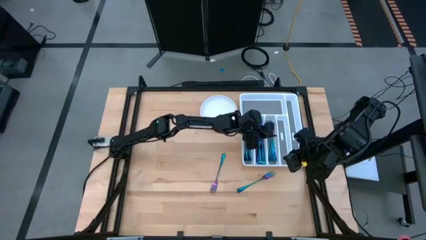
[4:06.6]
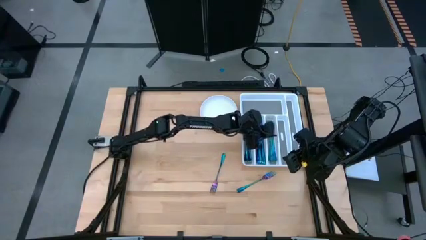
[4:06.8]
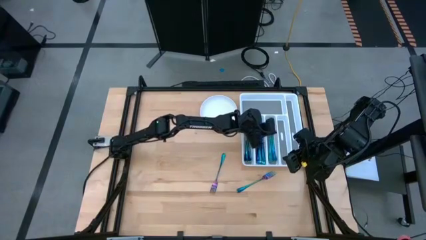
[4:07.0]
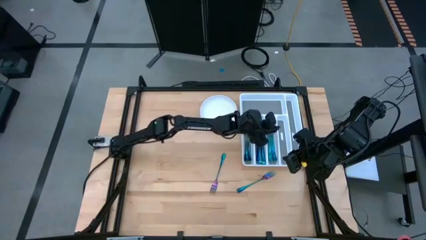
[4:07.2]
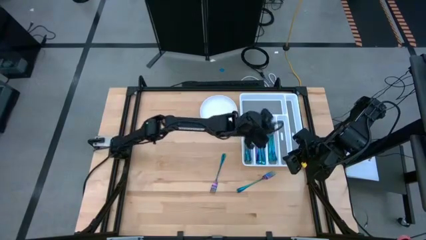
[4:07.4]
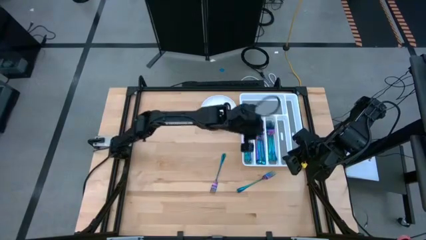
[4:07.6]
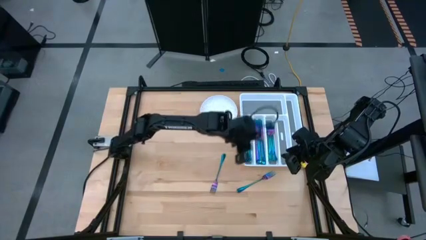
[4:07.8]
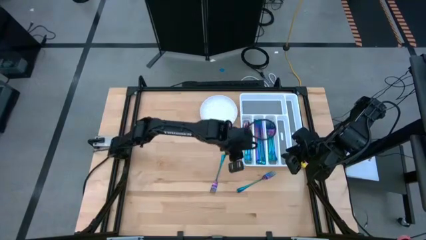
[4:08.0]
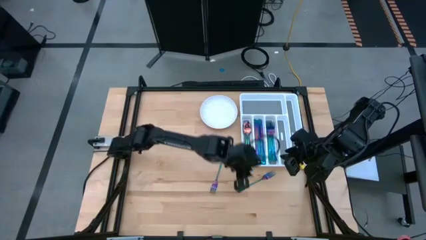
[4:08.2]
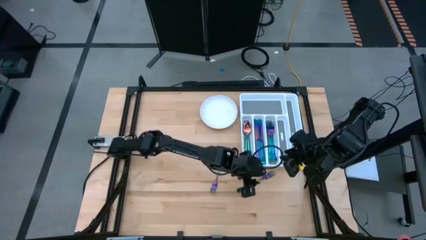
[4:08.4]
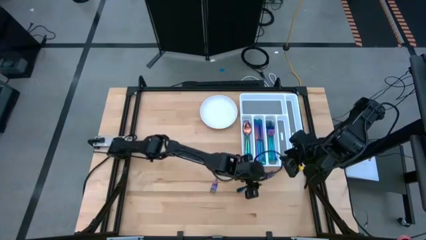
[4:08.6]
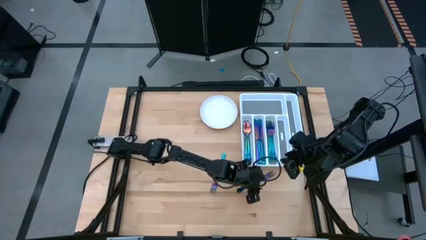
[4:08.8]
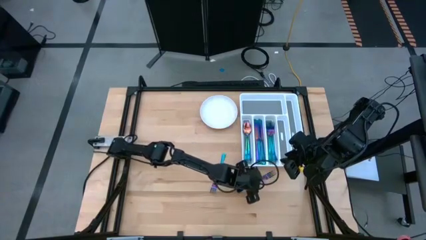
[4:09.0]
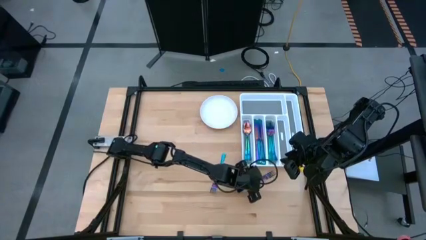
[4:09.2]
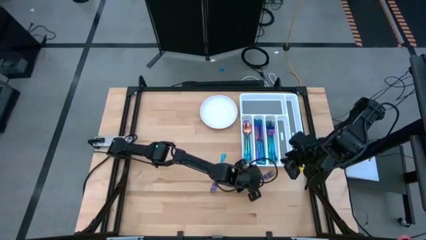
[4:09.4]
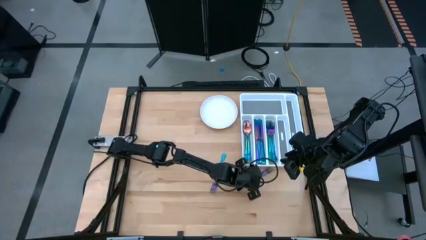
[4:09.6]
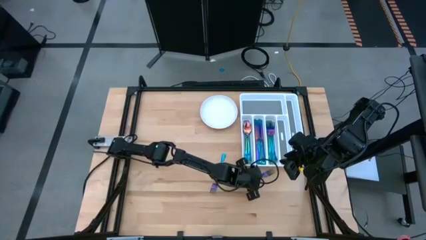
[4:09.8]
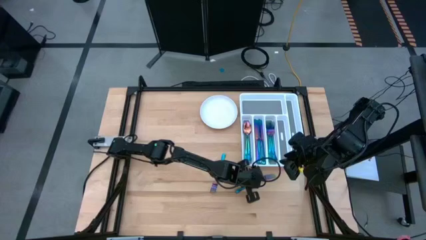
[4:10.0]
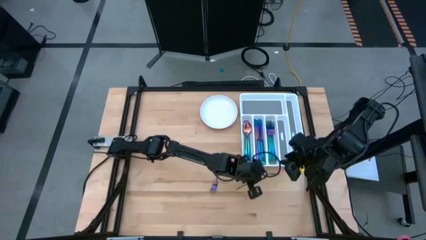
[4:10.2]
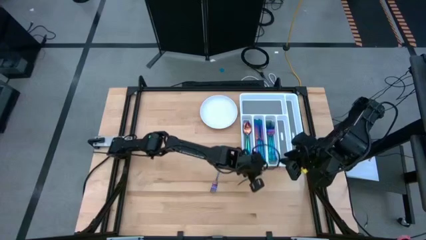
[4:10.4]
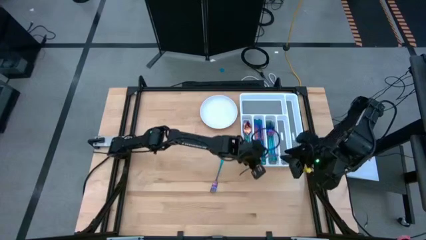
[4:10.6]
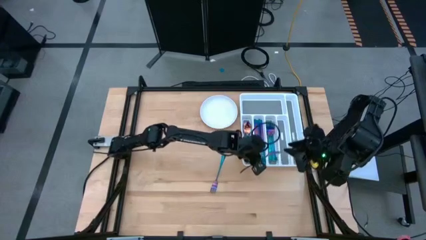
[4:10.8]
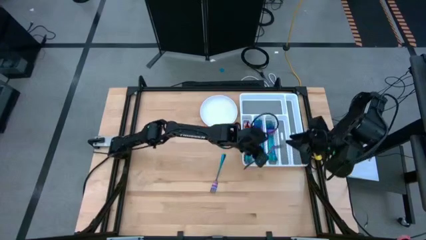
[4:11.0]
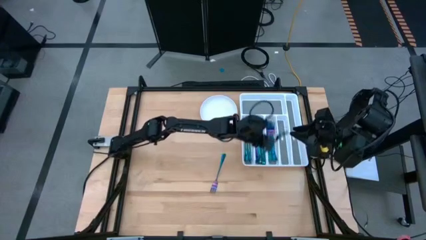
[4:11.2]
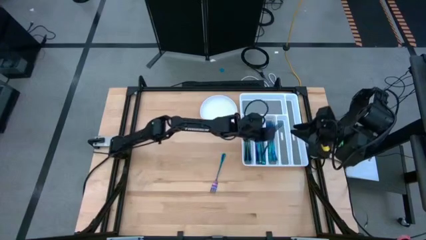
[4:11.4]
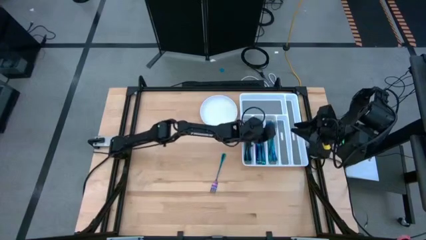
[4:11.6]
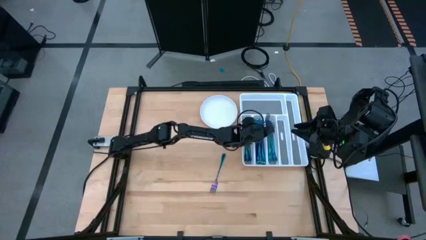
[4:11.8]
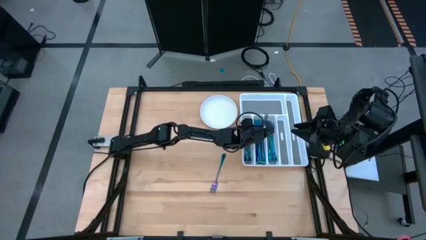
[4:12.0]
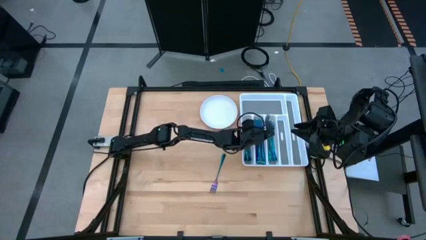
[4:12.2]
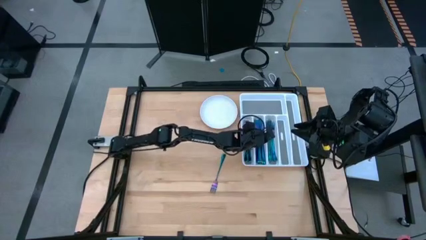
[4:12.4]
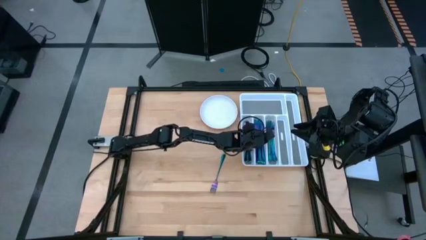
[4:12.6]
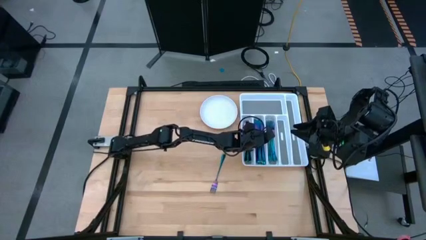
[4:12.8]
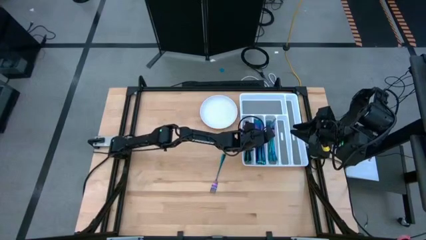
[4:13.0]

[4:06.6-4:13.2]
Task: Sort silverware
Put the purple fork into the white silverware tray

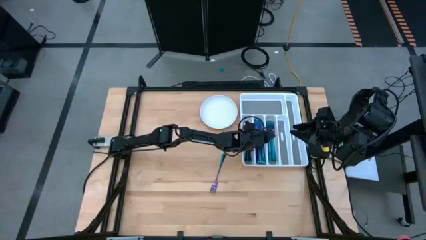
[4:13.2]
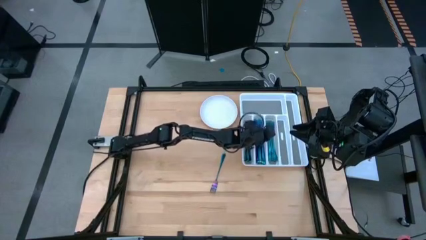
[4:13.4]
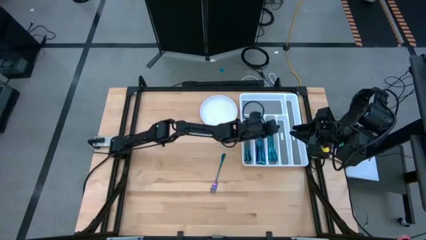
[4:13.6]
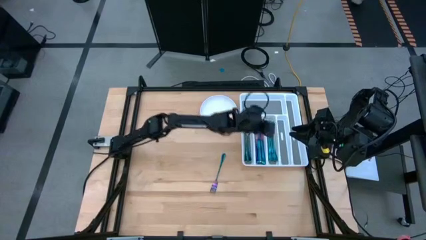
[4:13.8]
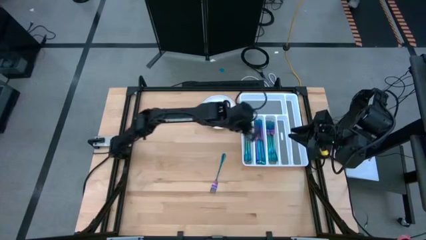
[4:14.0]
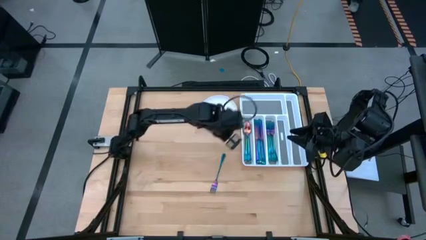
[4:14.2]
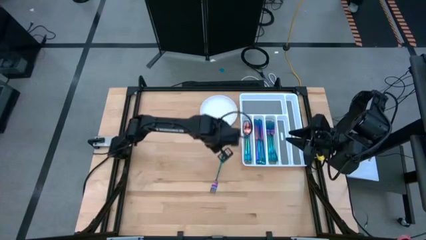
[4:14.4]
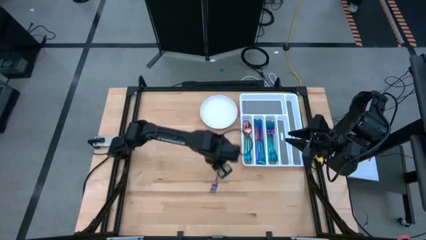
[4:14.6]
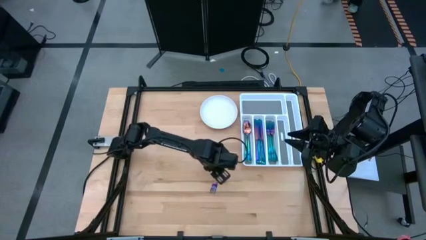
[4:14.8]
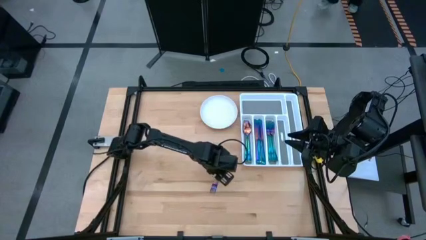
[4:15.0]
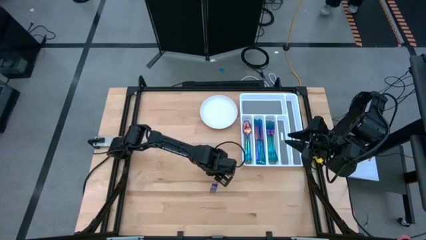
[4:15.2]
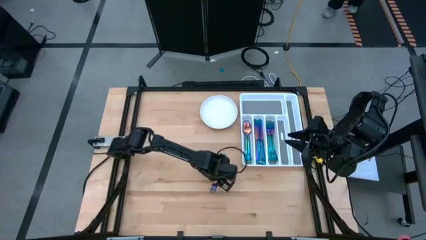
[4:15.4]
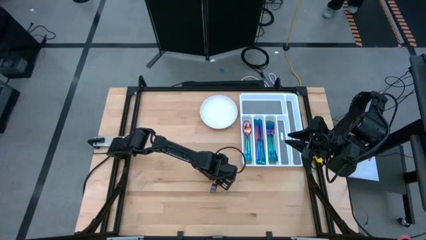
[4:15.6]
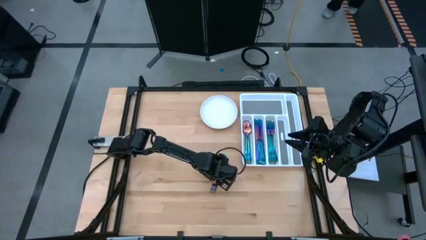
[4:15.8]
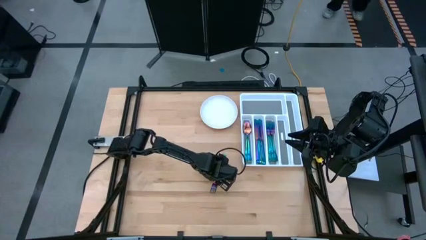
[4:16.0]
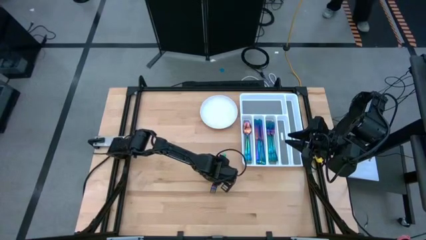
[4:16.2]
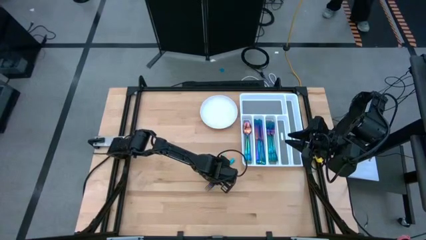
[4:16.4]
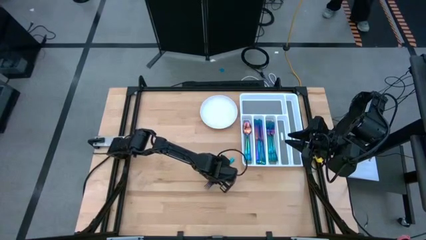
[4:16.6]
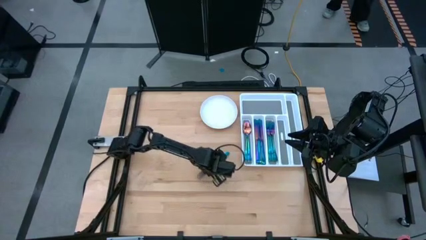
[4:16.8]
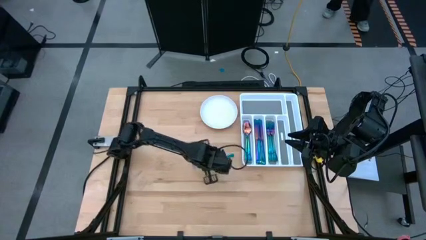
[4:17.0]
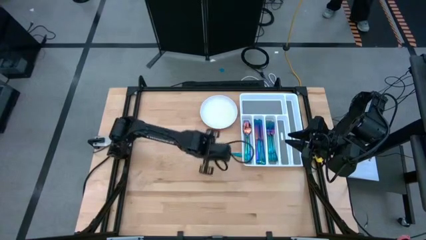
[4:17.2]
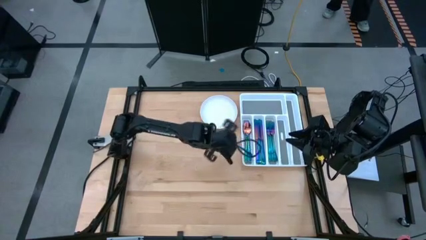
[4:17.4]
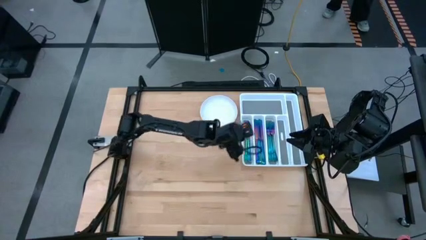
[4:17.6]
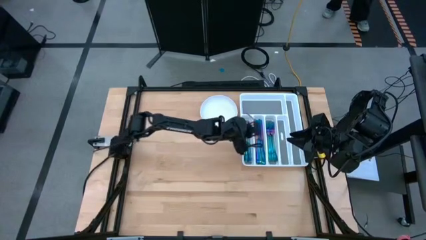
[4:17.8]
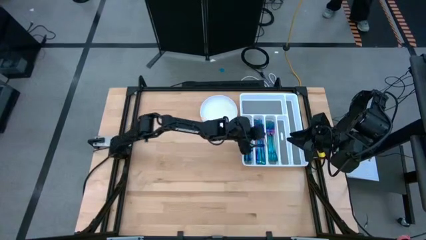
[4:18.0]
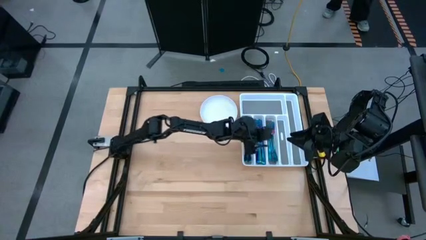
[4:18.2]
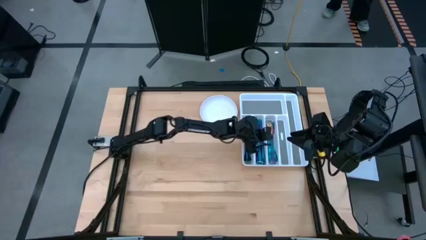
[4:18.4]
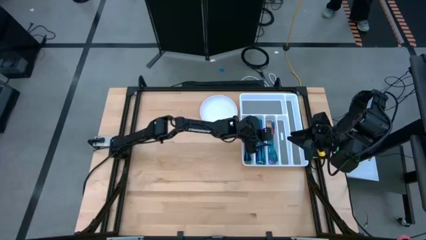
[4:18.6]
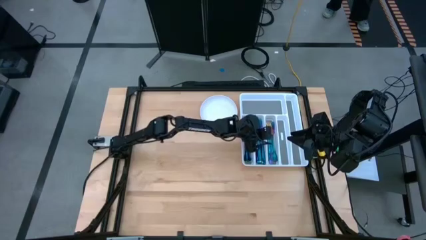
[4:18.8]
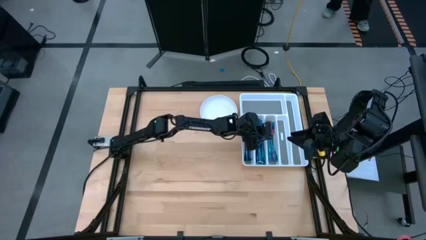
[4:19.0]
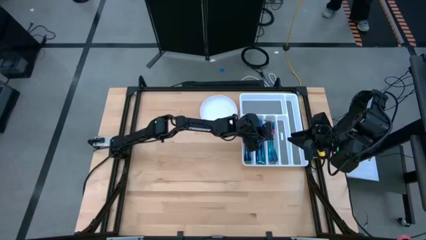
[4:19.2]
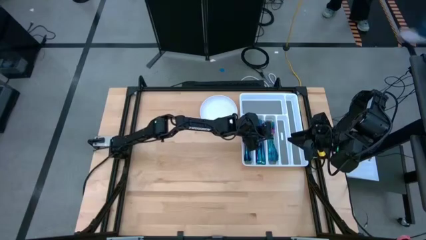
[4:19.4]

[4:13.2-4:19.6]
Put the purple fork into the white silverware tray

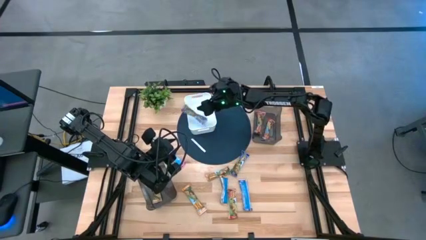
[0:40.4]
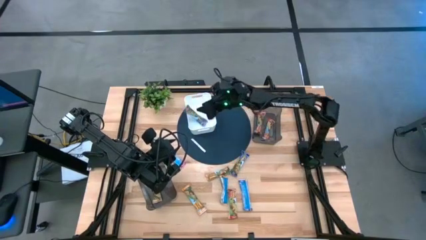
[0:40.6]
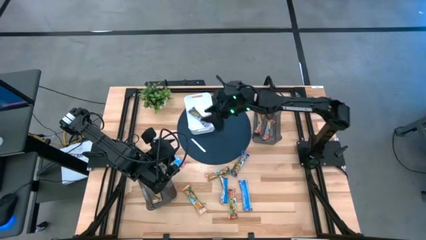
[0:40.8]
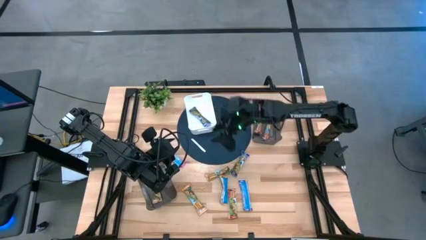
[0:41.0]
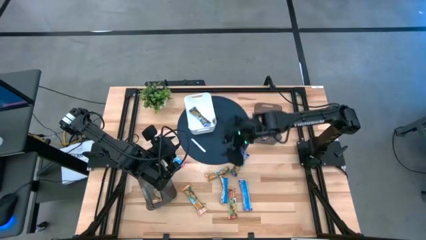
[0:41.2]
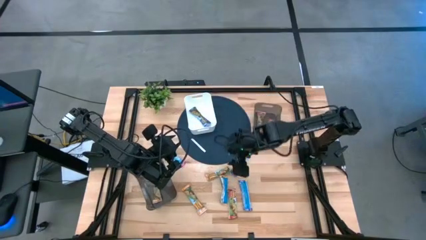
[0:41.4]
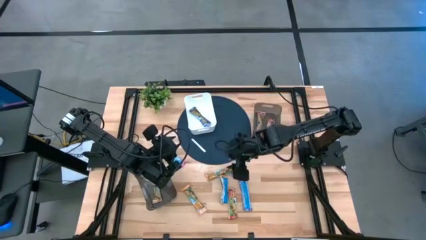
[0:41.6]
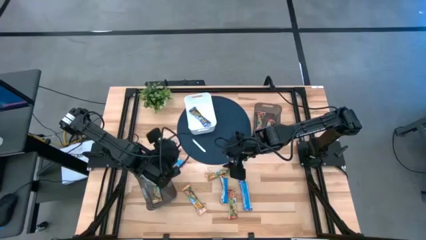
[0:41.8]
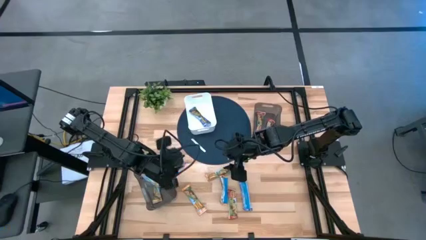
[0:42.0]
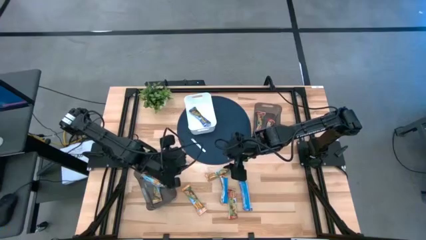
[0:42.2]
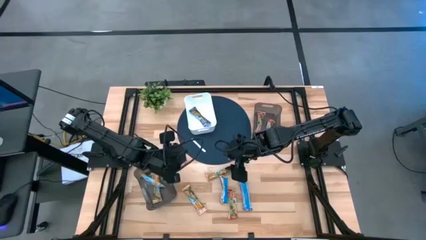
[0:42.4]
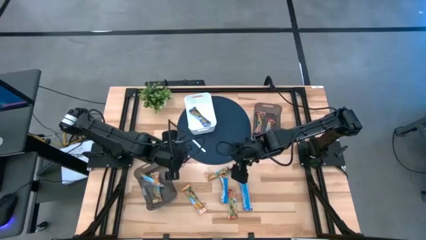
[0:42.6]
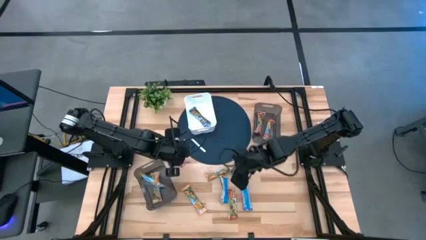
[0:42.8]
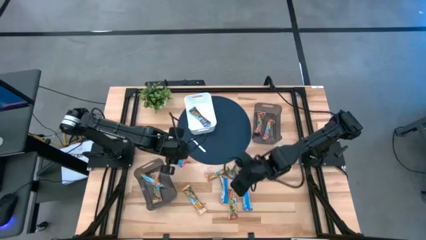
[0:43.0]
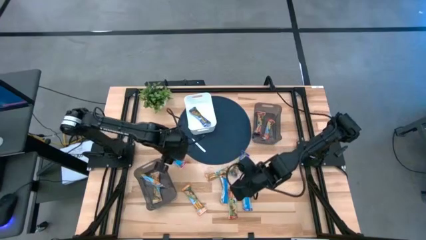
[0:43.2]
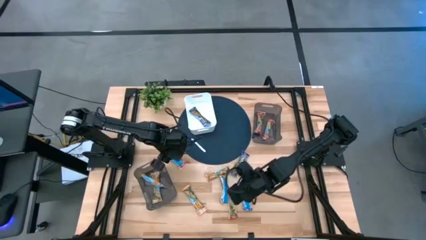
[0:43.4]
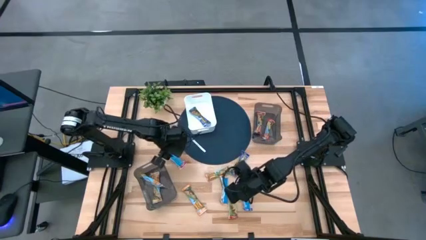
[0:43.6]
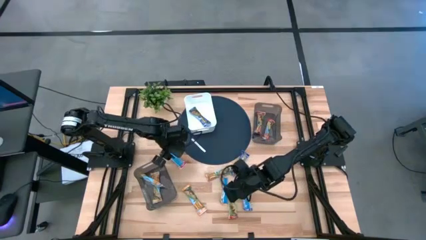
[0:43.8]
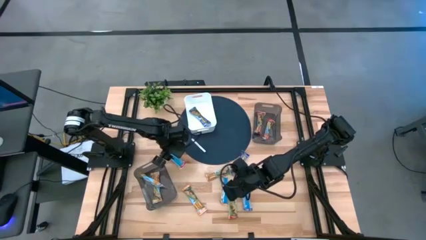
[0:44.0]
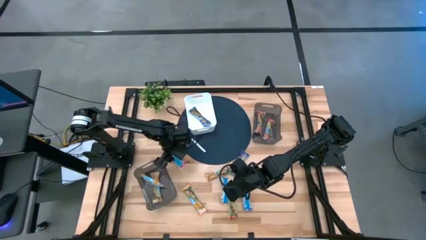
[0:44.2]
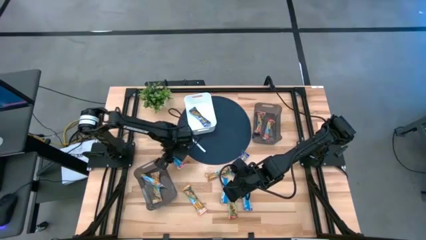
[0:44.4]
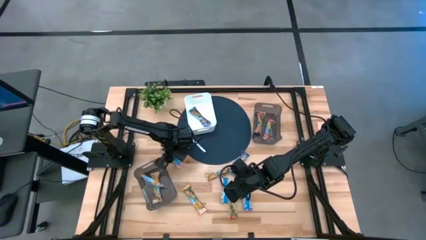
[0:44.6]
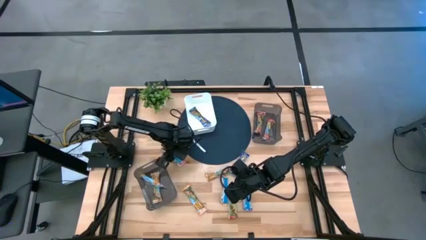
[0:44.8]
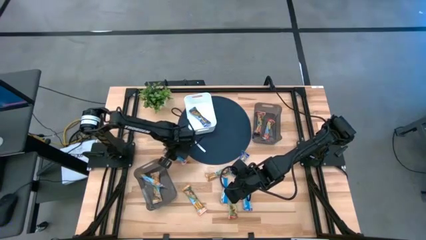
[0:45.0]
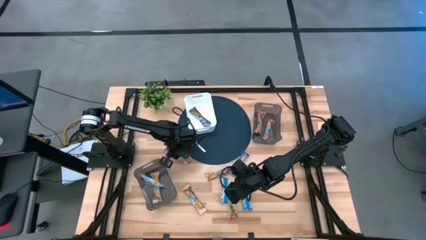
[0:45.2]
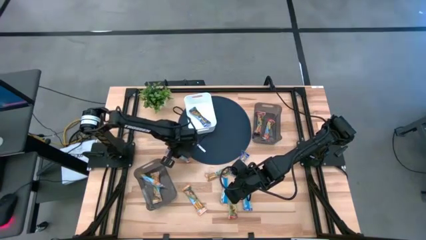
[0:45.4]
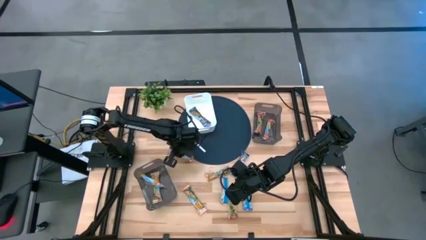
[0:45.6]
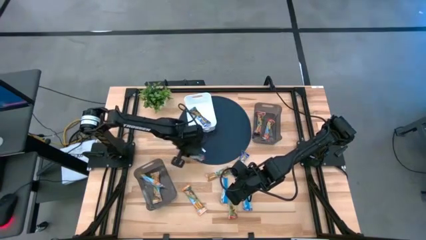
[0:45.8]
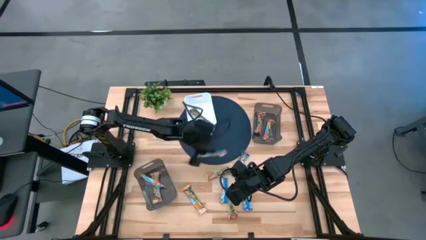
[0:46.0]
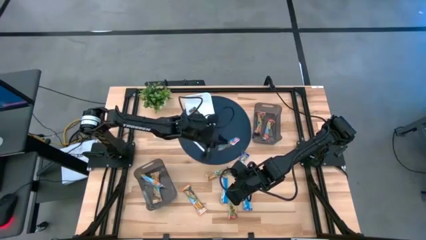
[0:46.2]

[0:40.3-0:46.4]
Task: Pick and place Granola Bars by type
Move red granola bar to the center of the table
